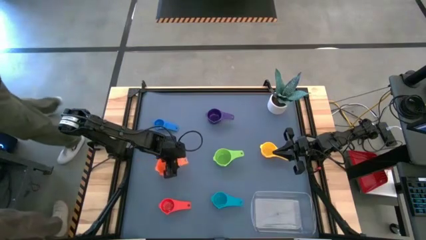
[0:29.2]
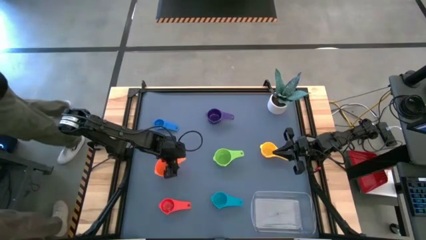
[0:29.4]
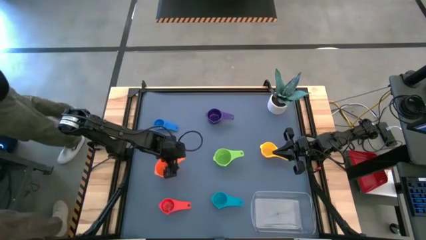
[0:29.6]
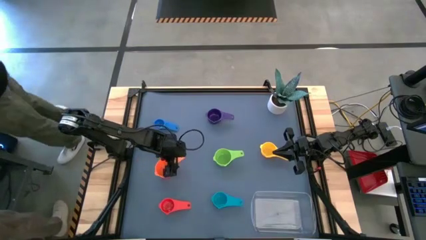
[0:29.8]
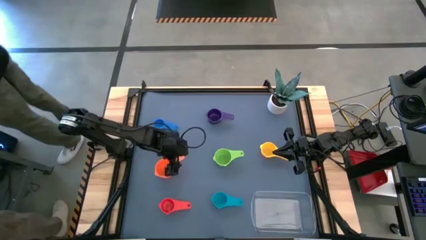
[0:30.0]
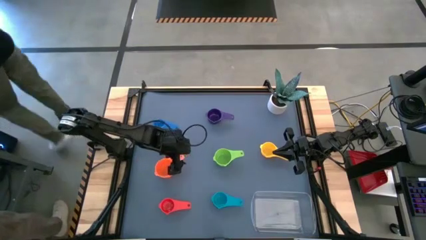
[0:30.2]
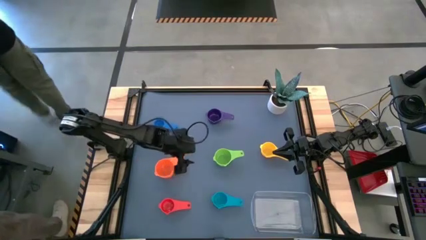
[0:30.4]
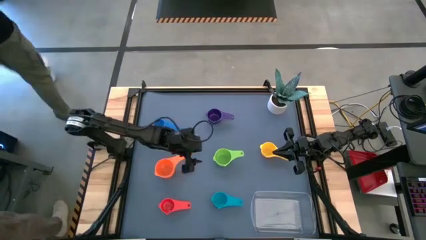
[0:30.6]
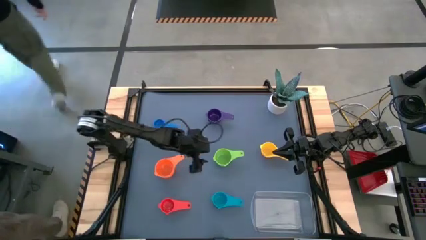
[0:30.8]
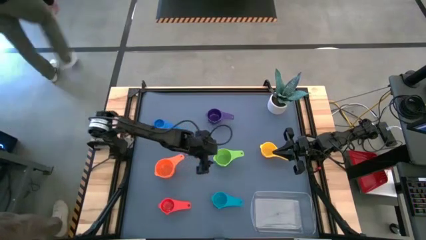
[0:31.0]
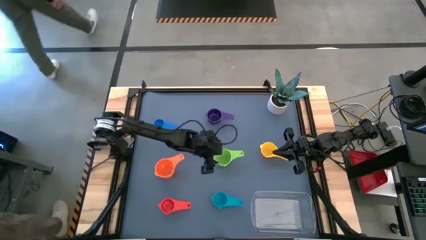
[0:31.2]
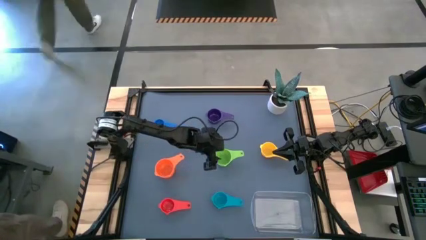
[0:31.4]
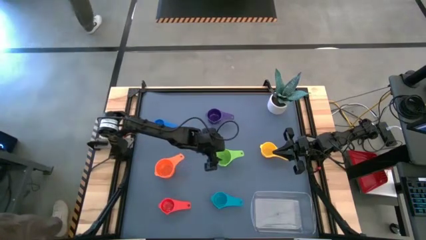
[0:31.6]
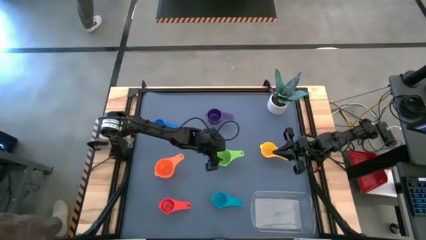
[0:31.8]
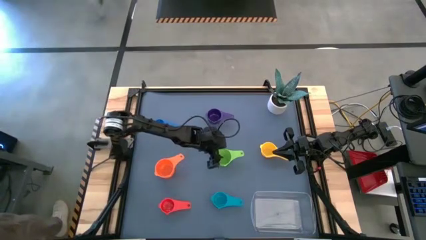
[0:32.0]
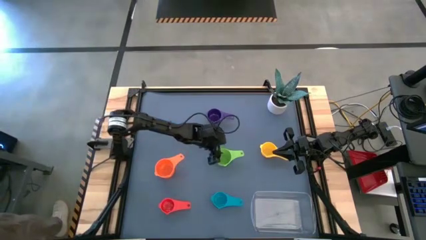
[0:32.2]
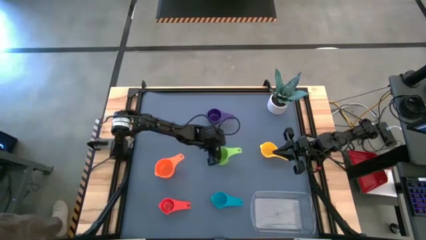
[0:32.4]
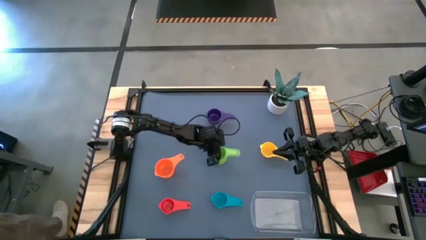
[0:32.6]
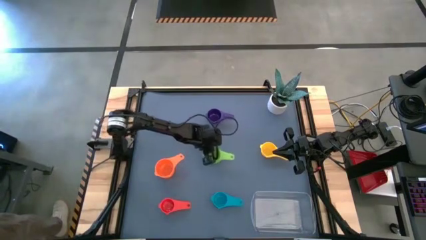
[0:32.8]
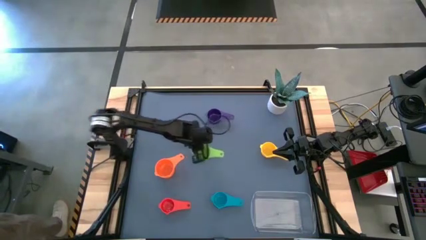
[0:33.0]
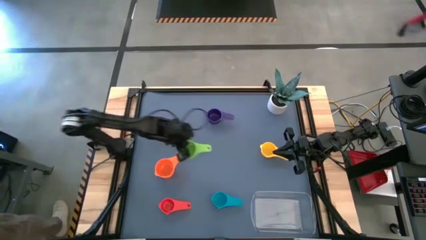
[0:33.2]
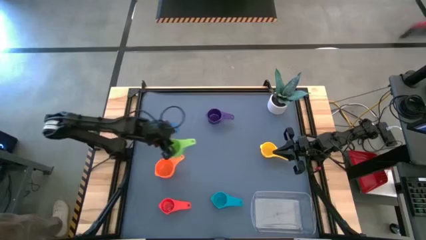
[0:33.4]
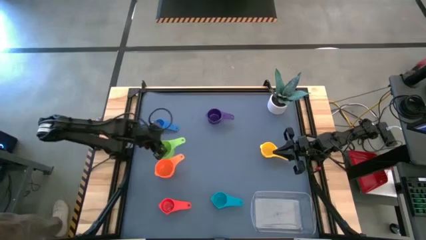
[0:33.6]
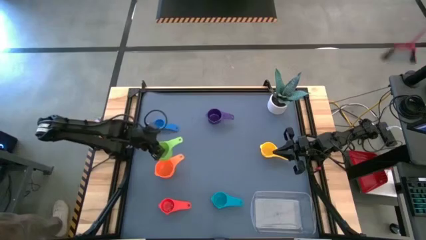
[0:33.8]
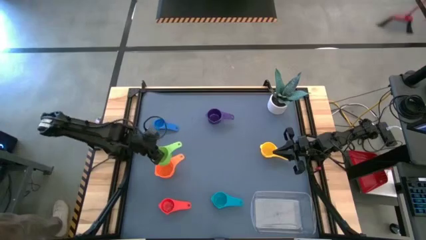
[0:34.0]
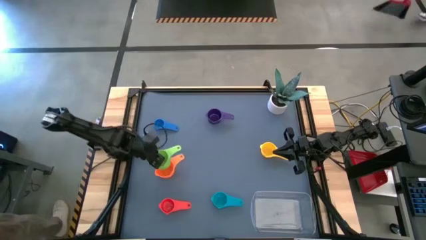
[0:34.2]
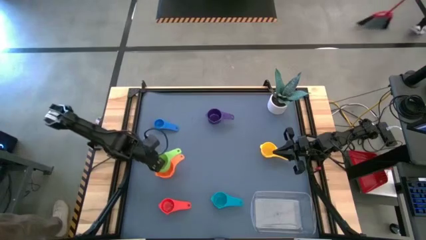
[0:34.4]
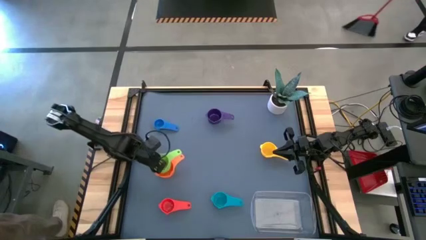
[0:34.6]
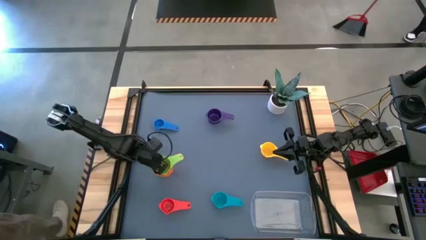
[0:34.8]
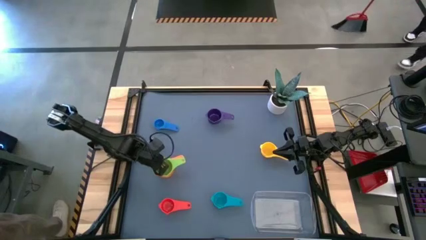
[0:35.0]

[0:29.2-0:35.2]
Task: Nest measuring cups in basket
Stack the green measuring cup on top of the orange measuring cup

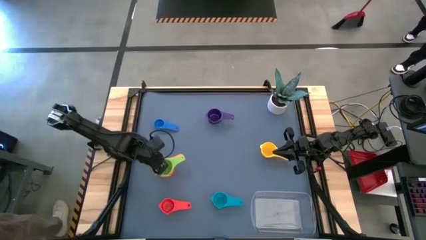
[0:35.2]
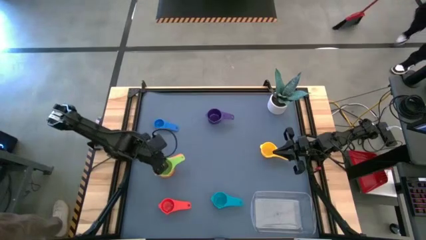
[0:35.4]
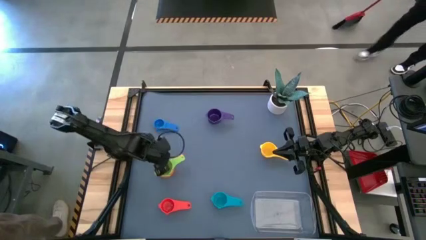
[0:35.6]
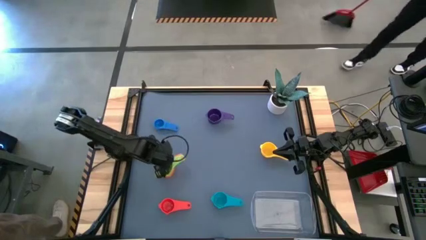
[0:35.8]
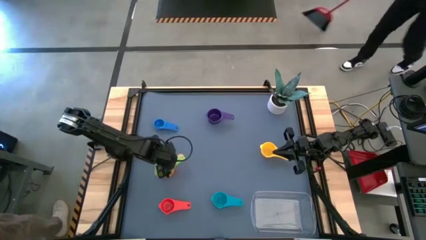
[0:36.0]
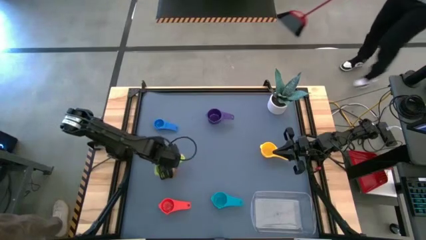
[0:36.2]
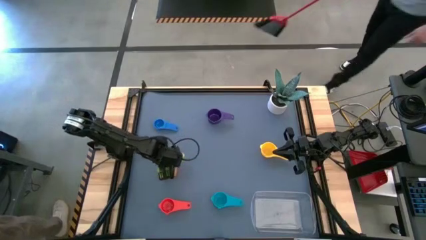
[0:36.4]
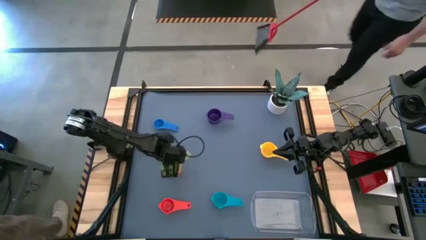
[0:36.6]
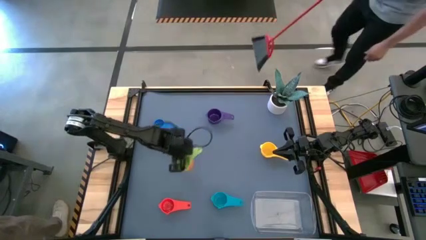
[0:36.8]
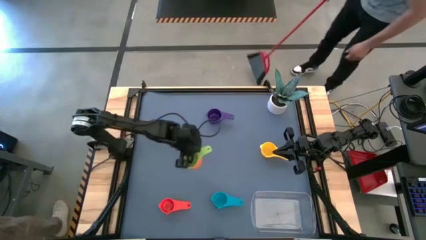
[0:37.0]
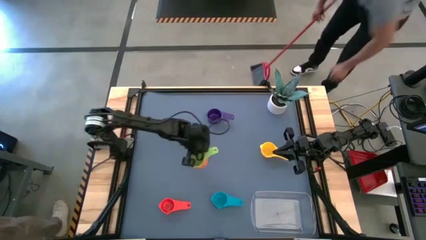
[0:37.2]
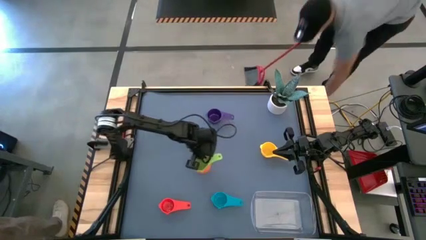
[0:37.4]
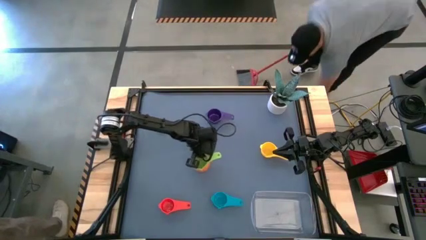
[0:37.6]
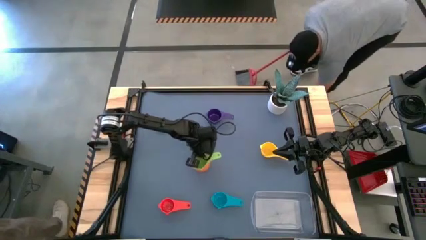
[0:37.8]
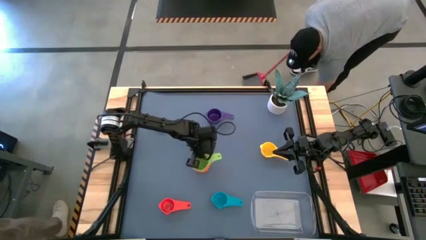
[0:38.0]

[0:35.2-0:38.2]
Move the stacked measuring cups to the center of the table

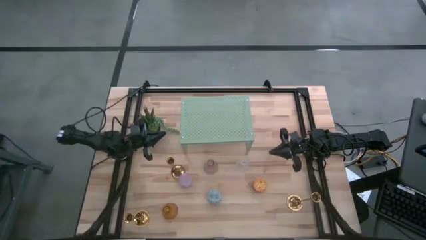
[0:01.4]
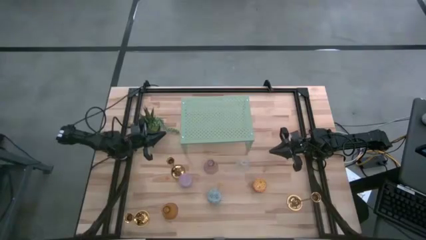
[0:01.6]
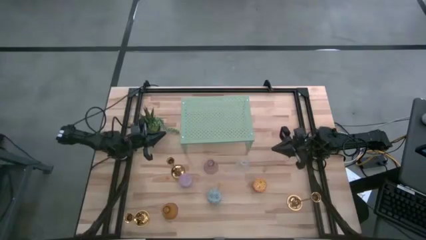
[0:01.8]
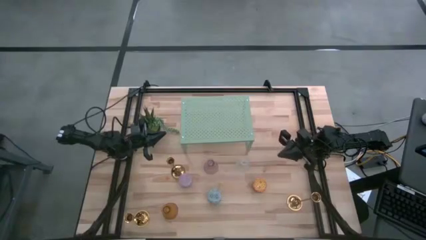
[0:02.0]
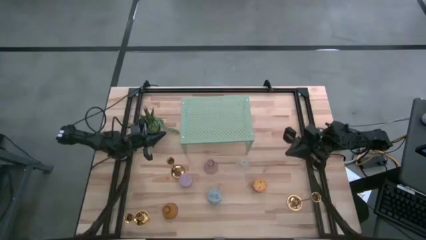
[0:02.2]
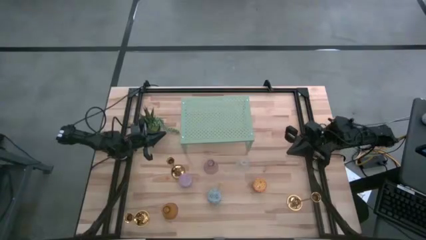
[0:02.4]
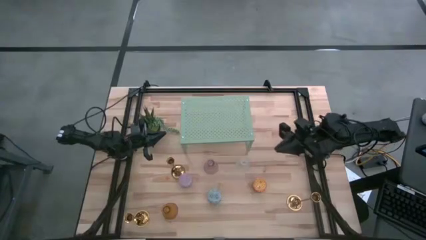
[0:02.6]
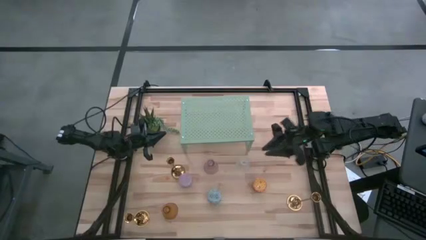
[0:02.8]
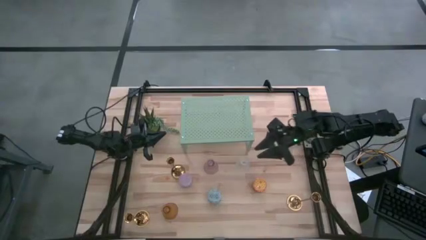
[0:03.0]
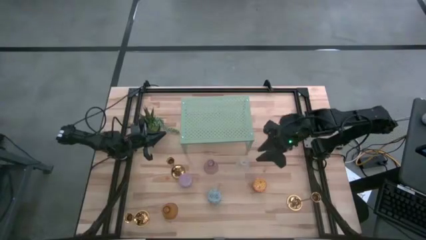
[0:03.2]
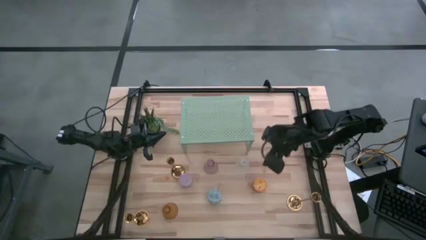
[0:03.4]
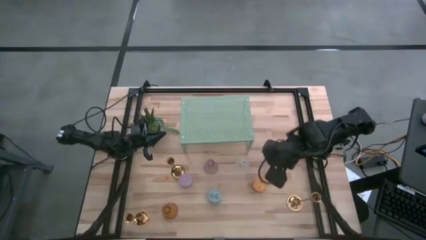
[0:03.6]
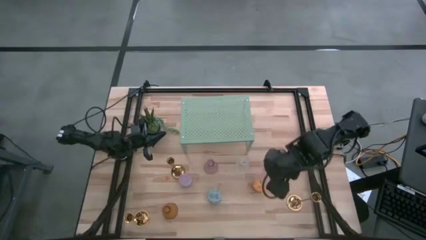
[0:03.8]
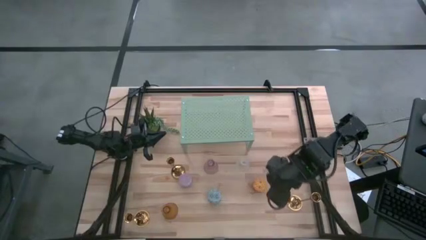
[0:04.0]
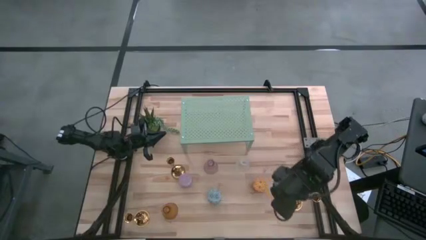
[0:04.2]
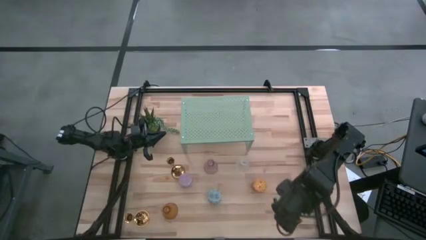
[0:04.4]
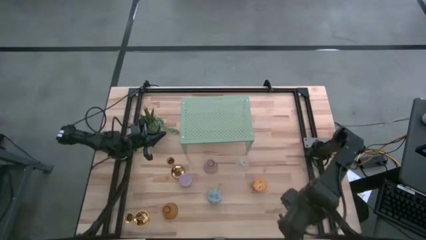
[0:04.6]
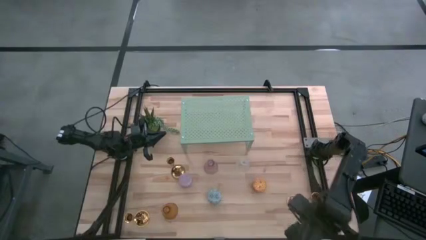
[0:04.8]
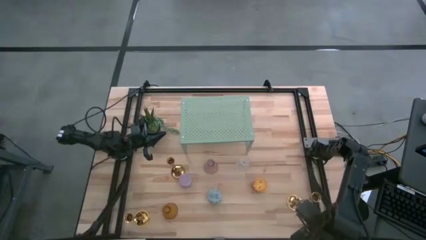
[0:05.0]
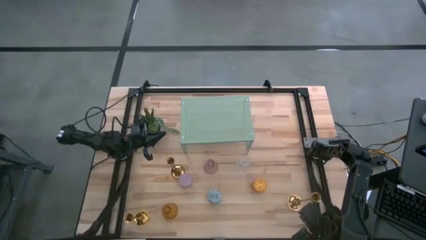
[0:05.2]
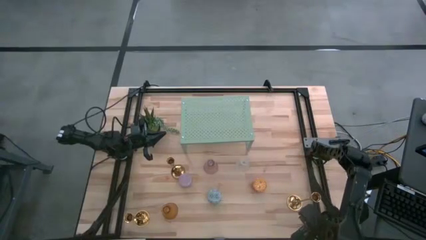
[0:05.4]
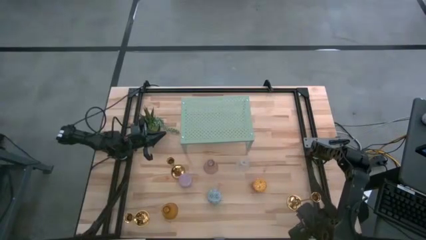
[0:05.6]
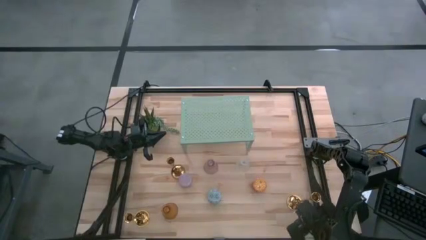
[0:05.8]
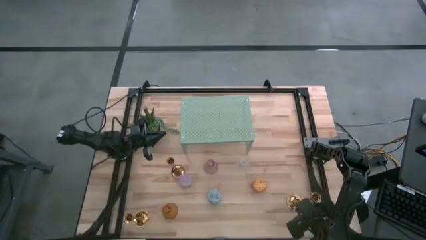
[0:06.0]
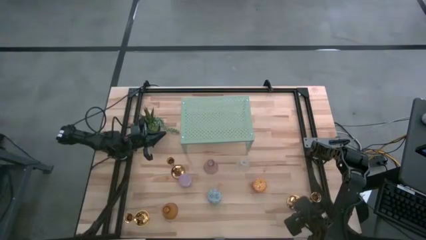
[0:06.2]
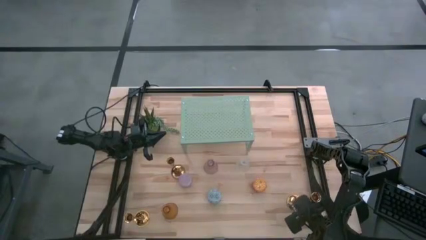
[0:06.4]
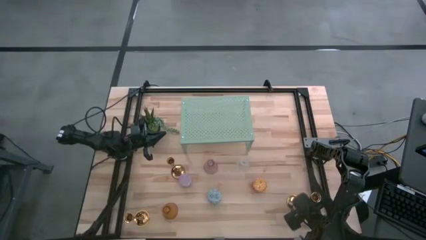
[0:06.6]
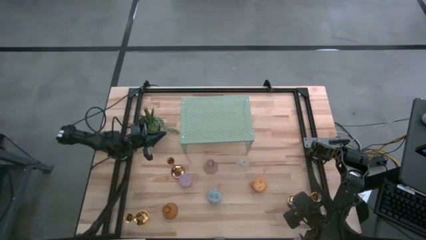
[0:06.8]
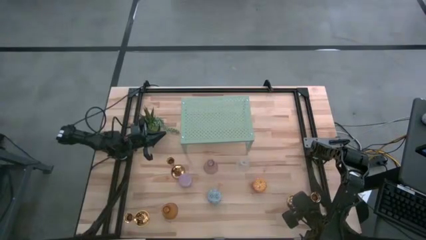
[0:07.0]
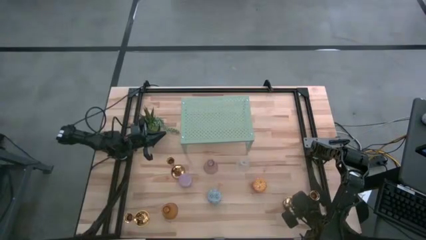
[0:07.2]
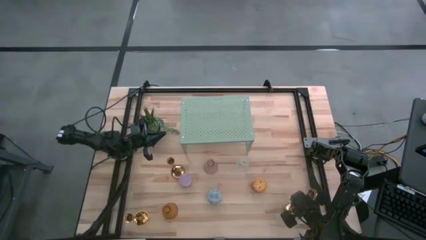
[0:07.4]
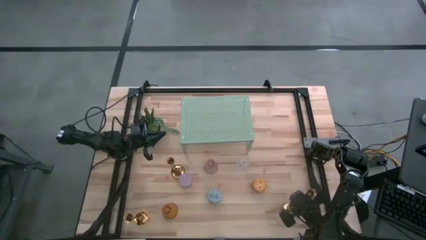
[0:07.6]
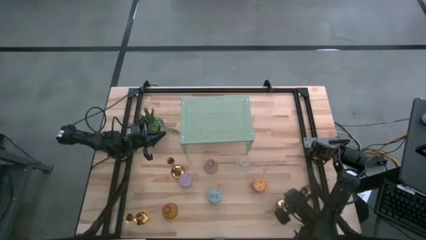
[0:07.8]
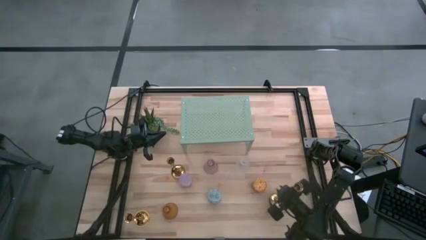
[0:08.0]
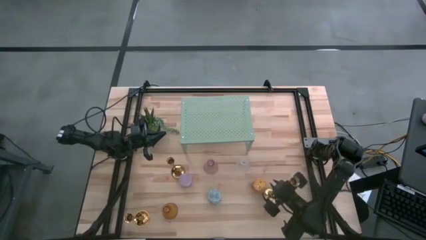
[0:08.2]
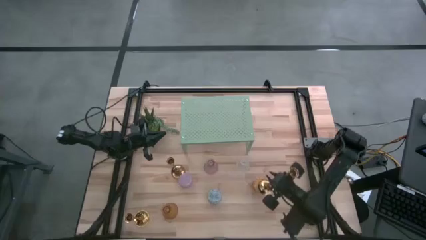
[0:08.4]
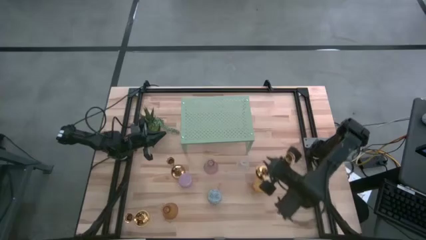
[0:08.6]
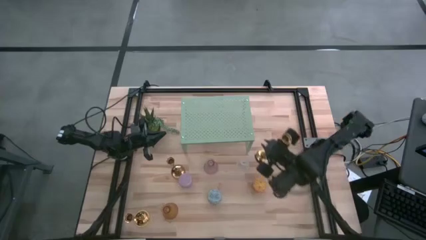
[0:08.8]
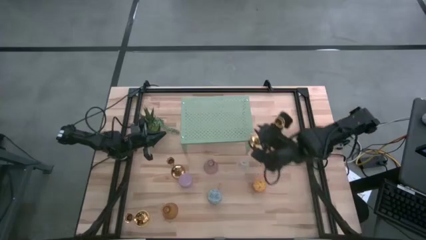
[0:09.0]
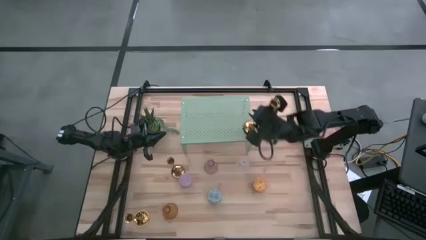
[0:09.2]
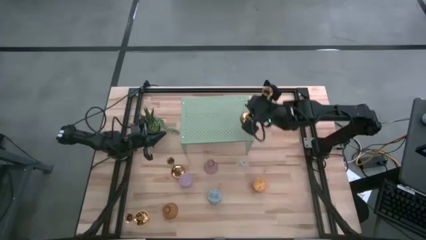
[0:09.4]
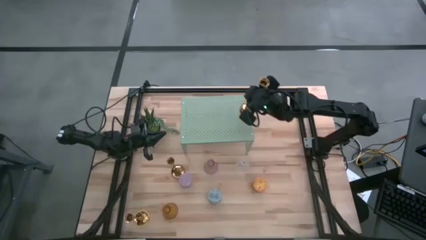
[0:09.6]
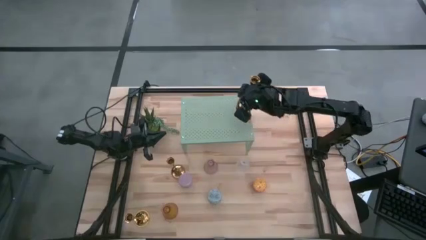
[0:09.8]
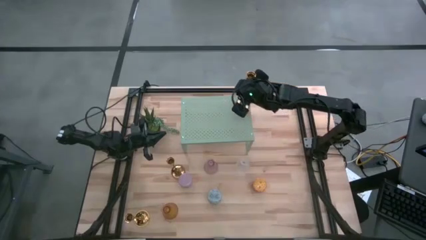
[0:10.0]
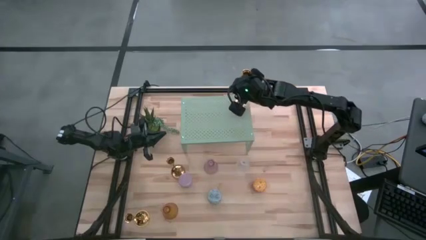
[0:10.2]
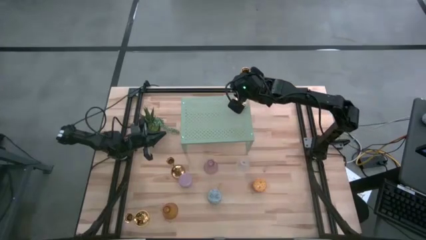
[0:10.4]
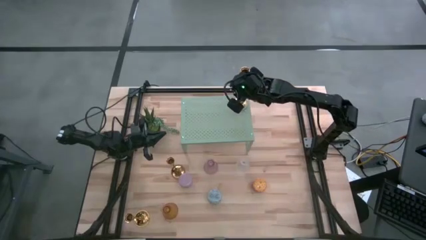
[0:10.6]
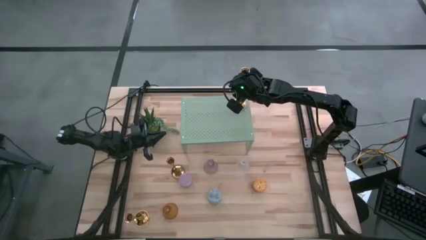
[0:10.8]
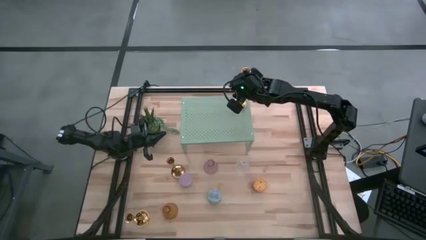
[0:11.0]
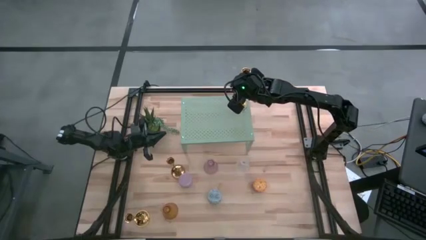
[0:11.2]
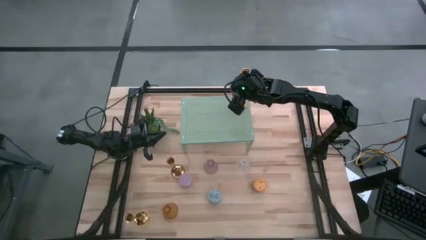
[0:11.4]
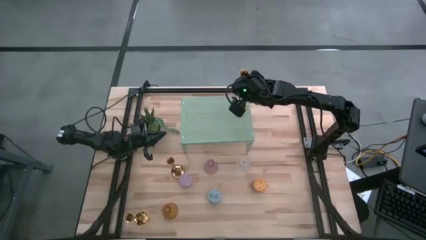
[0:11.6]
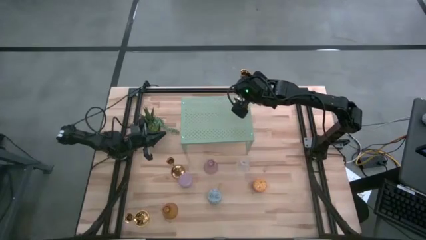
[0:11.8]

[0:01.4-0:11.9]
Task: Pick & Place candle stick holders
Put the bottom right gold candle holder on the shelf
